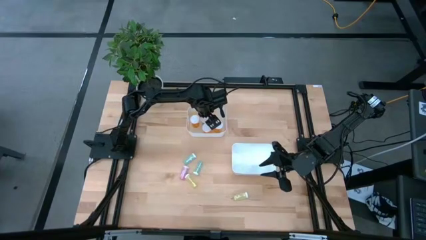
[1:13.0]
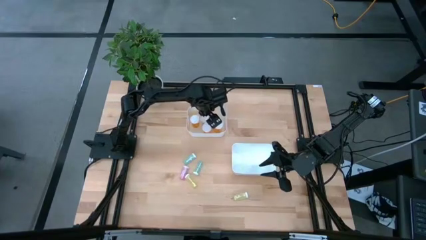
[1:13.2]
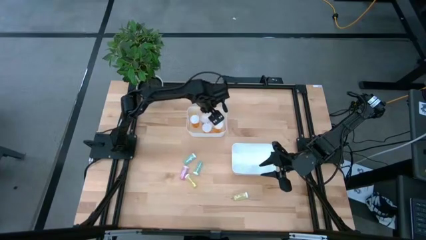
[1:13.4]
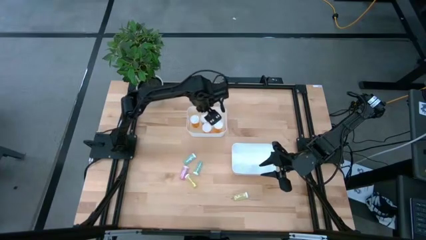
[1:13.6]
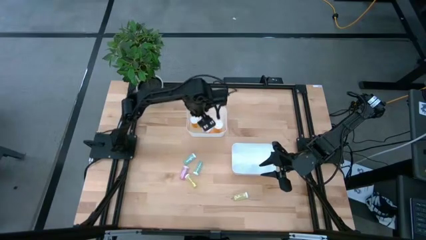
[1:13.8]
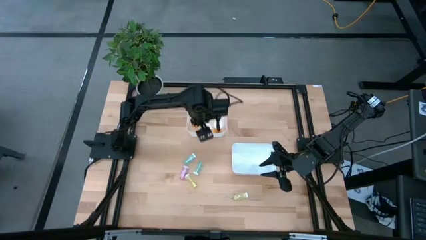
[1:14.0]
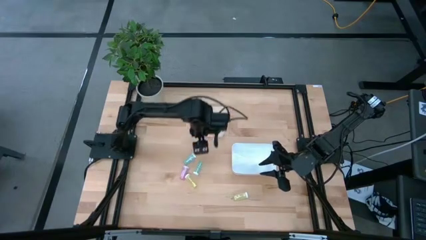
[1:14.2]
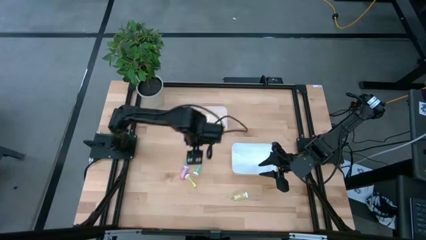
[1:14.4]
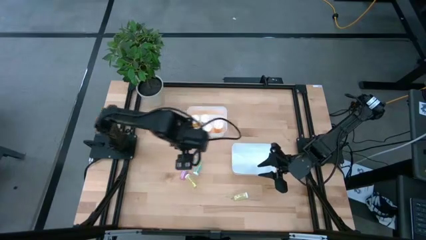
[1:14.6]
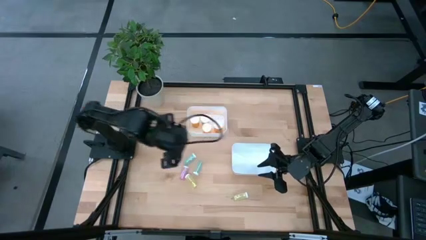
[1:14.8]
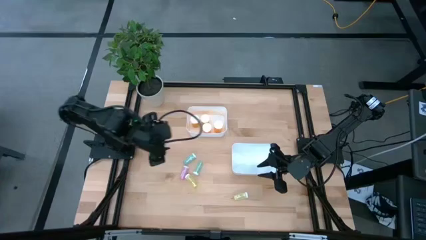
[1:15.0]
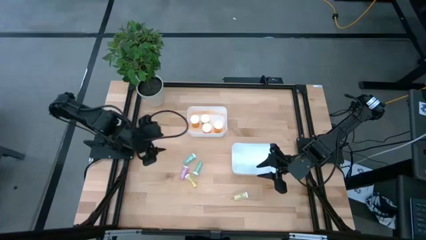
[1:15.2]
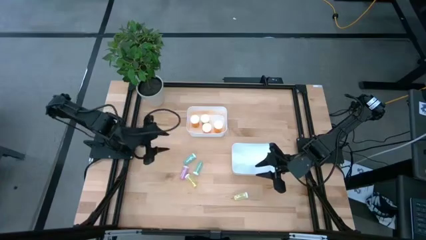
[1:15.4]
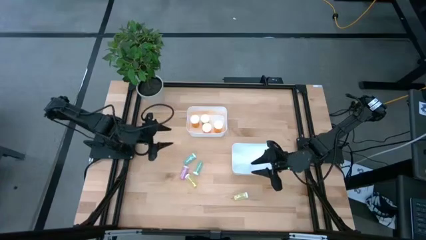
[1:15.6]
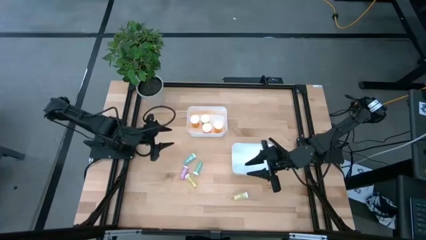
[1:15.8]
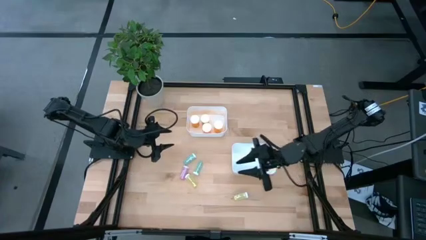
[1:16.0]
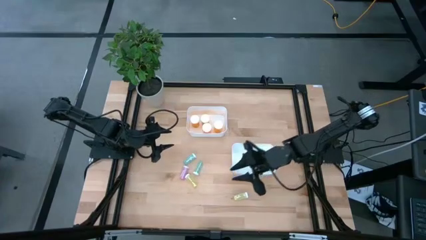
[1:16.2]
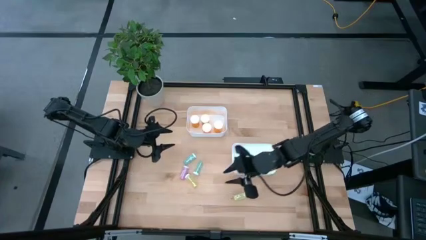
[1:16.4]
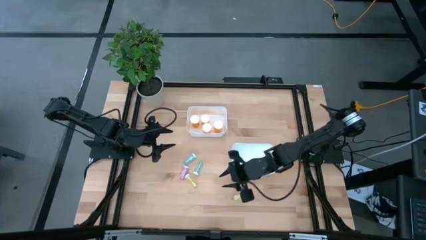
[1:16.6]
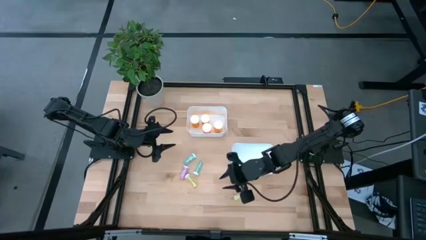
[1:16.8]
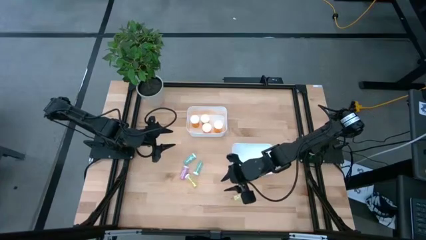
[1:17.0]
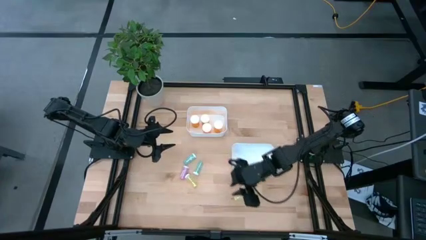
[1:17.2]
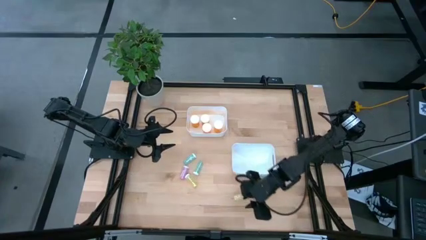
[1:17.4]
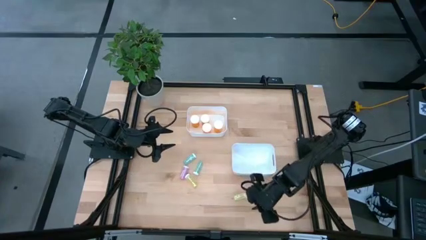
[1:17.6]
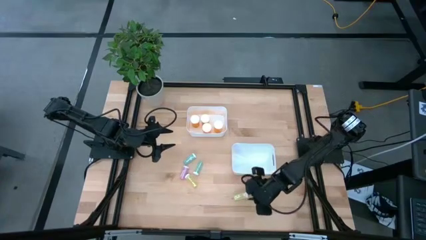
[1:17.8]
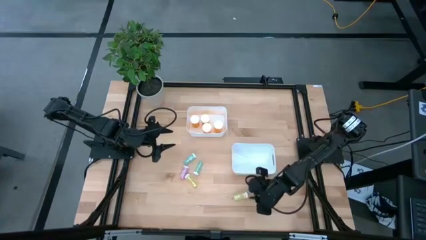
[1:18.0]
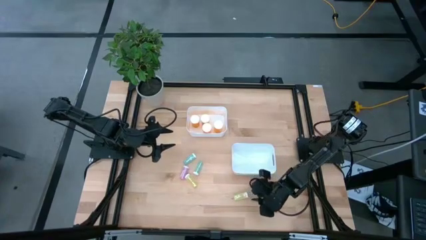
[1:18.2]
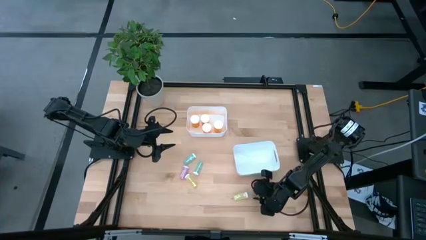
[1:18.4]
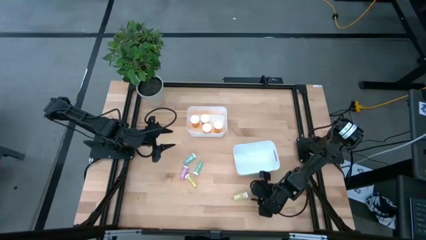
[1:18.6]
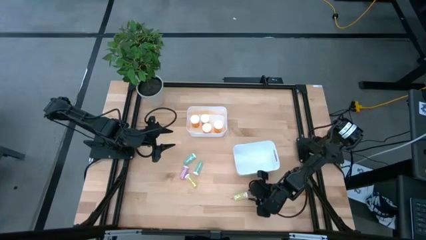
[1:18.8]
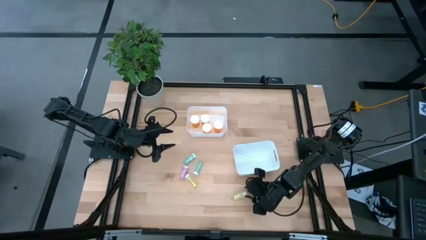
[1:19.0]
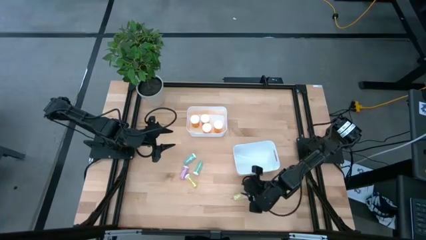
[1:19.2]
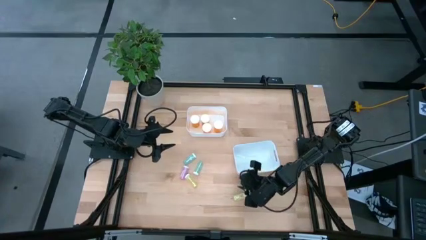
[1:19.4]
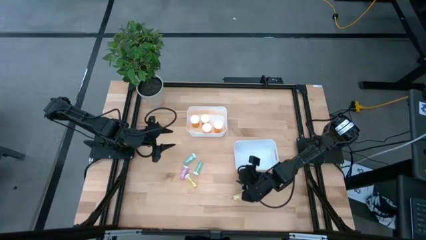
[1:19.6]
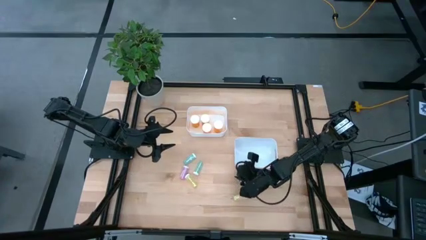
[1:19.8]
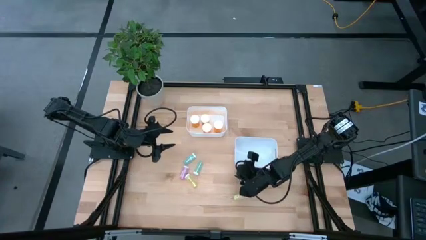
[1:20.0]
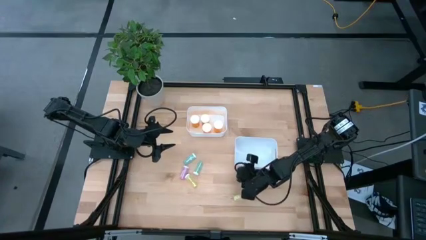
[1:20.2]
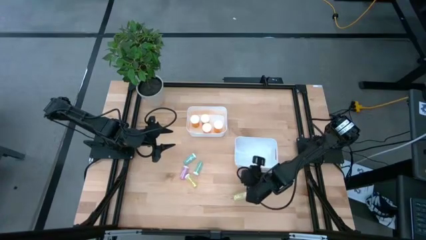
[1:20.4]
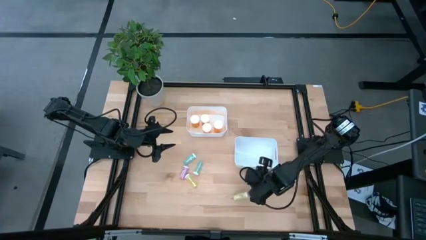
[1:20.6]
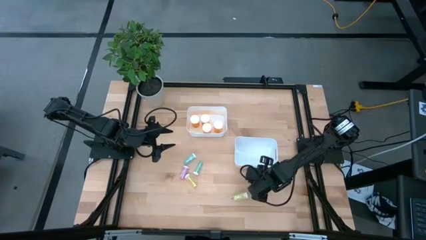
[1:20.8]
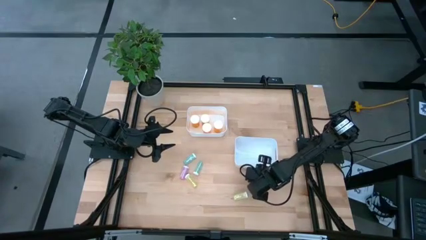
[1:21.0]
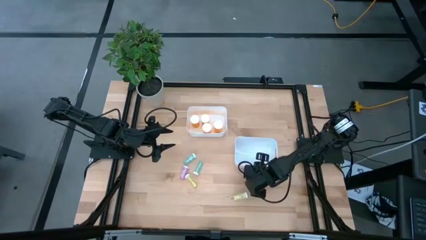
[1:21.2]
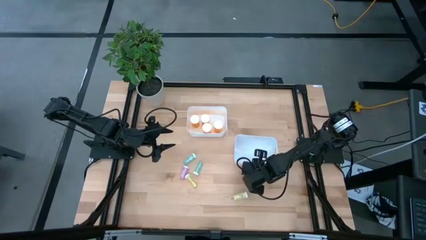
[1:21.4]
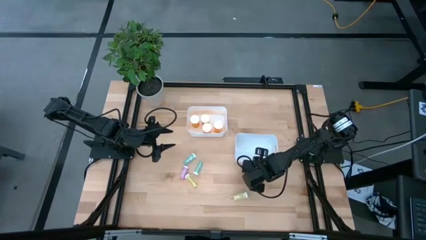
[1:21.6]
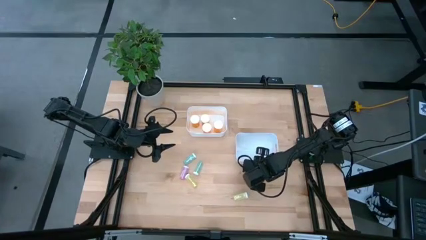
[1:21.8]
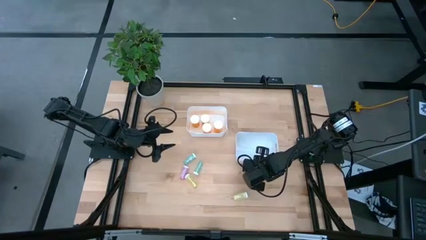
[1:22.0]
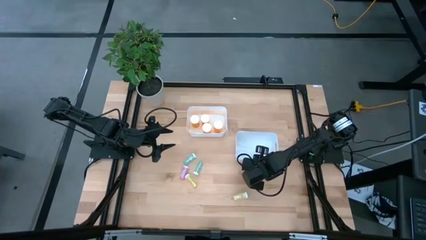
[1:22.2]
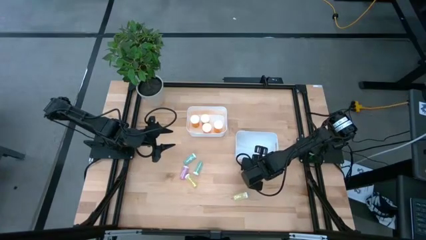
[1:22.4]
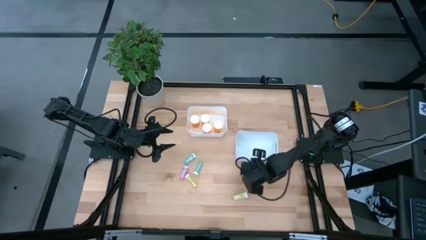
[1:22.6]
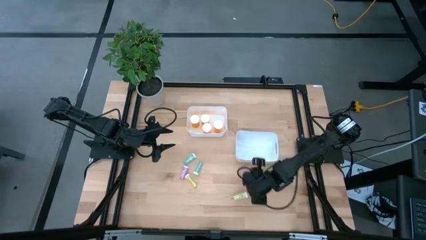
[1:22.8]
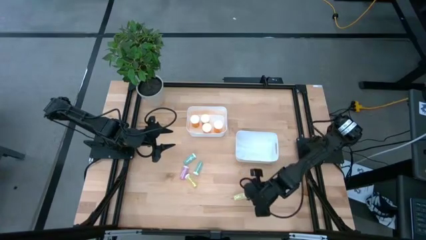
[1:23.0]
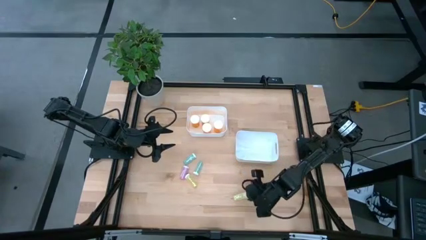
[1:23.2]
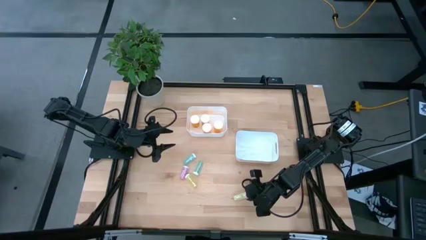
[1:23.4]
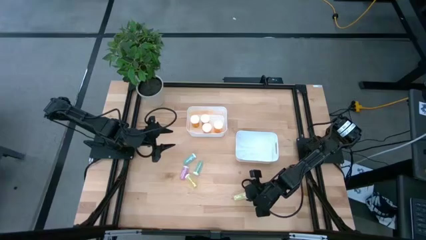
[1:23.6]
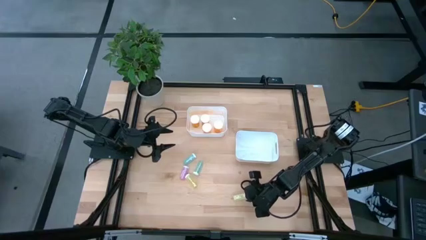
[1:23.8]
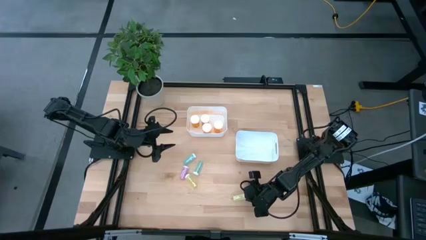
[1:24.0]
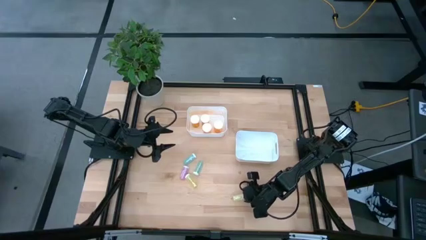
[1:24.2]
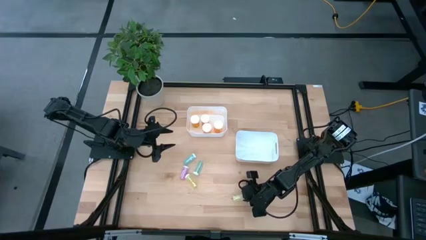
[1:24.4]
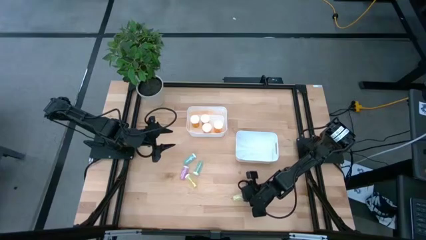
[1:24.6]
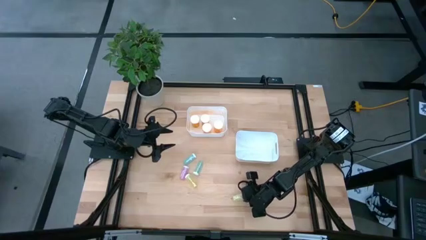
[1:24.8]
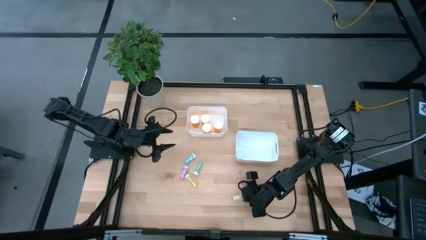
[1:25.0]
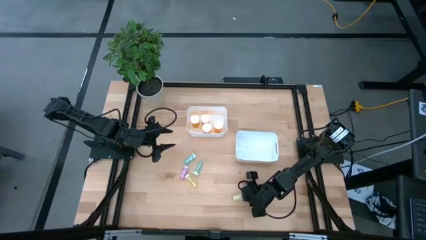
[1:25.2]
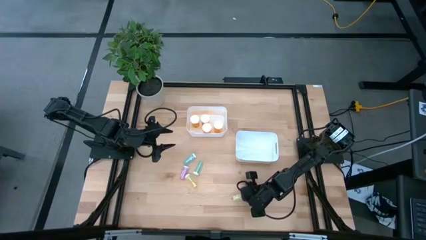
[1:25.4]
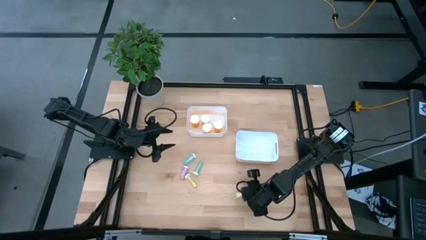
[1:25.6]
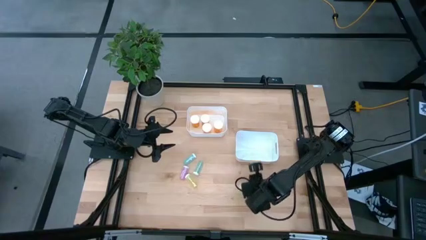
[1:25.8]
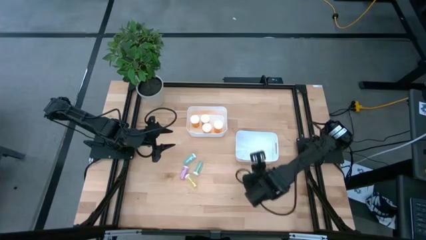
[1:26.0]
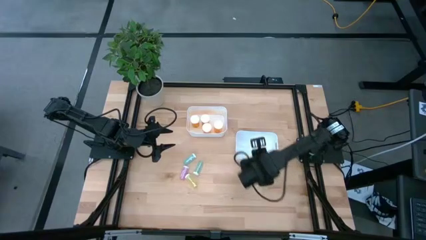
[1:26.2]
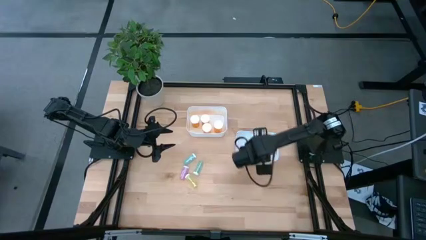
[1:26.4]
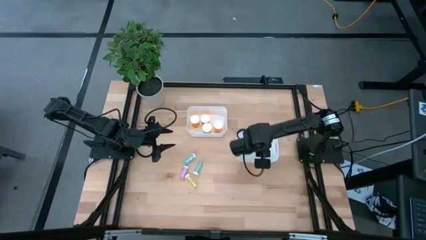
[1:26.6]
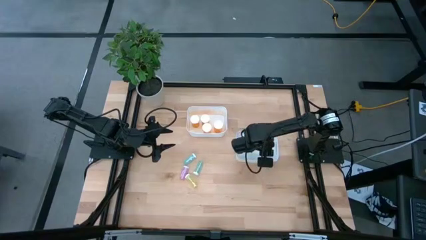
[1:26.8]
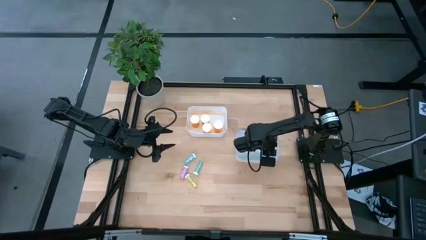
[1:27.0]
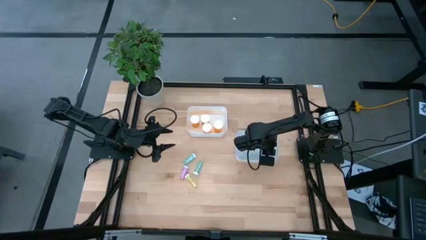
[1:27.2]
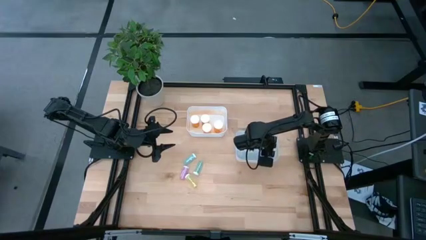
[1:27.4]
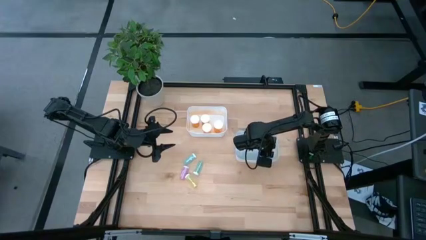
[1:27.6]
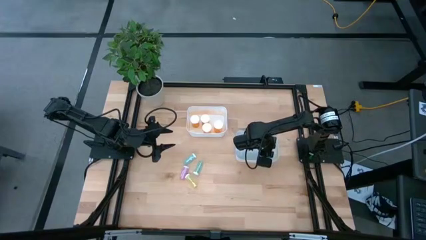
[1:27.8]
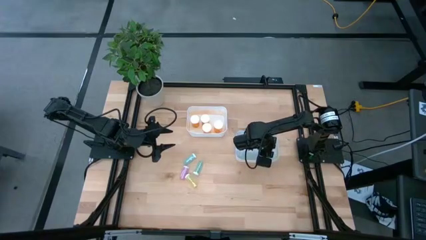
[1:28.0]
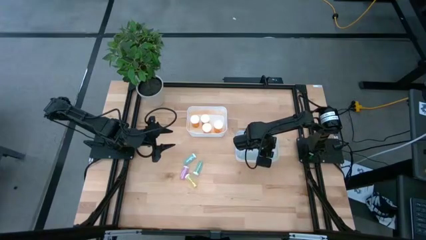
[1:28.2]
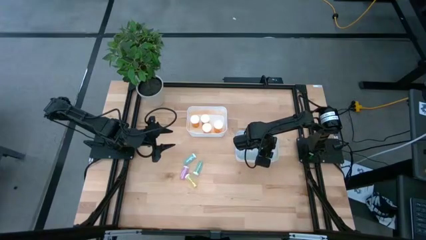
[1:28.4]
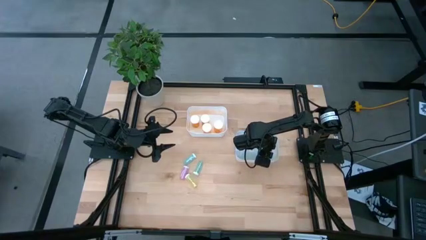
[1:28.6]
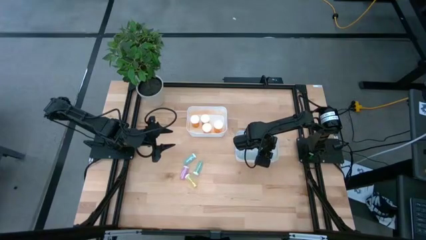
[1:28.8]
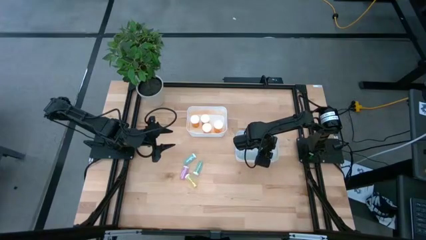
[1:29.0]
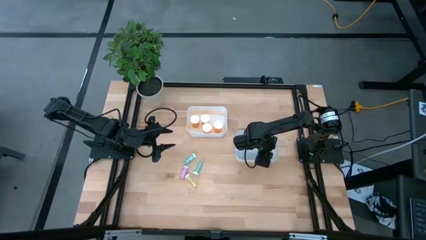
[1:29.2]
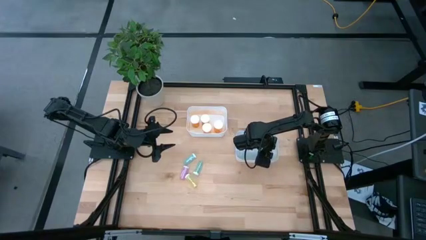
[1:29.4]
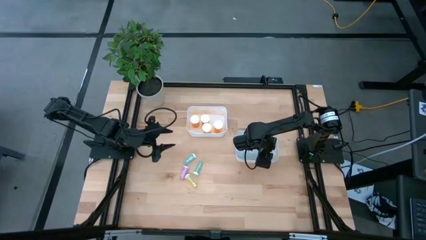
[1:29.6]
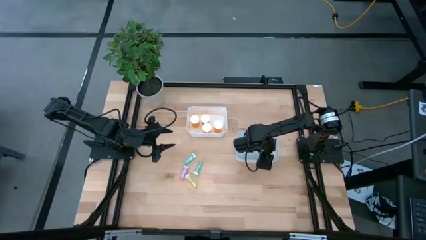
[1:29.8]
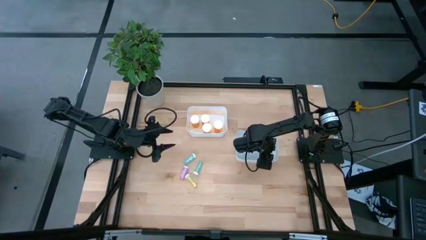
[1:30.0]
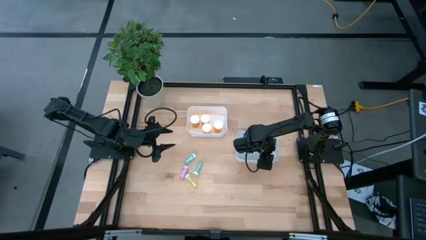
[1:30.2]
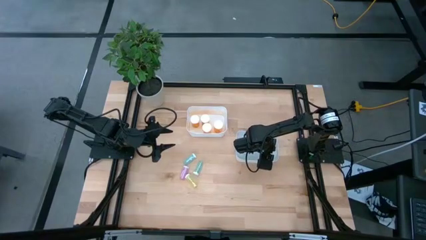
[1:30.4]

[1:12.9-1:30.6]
Task: Pick and place medicine bottles into bin by pill shape (circle, oval)
Put the small yellow pill bottle into the bottom white bin
